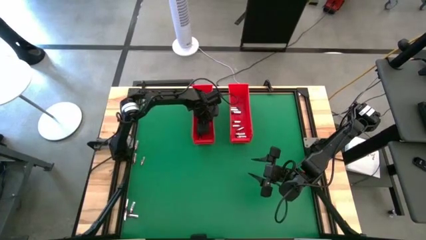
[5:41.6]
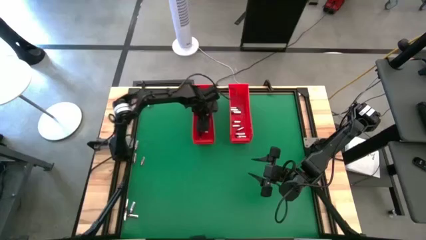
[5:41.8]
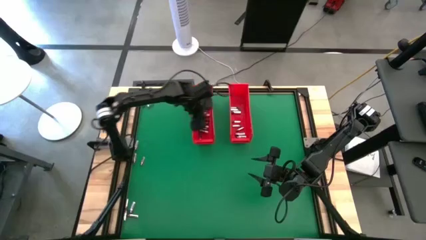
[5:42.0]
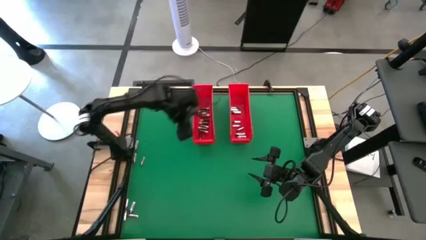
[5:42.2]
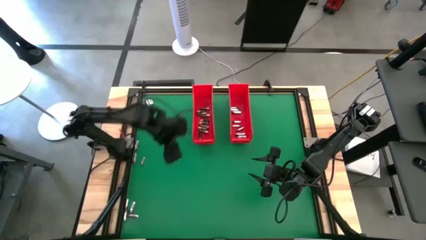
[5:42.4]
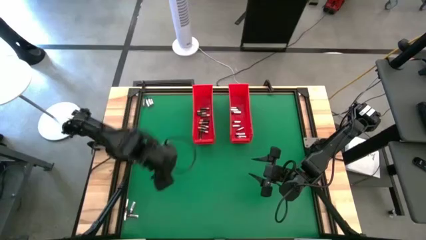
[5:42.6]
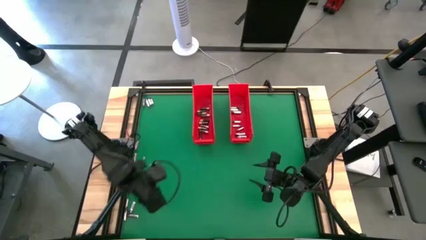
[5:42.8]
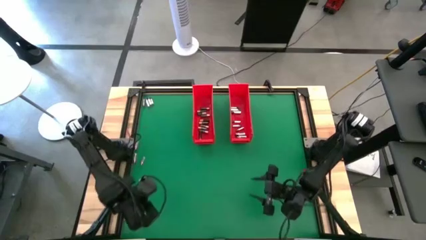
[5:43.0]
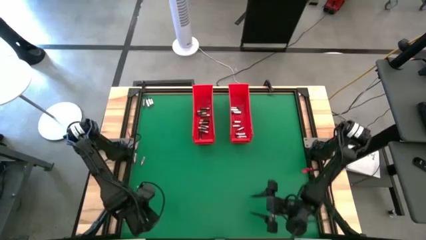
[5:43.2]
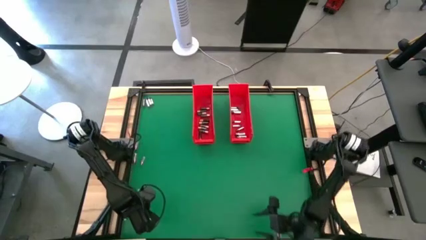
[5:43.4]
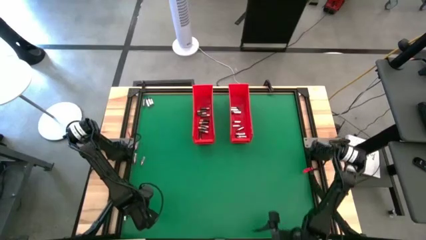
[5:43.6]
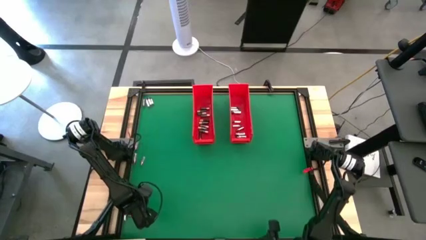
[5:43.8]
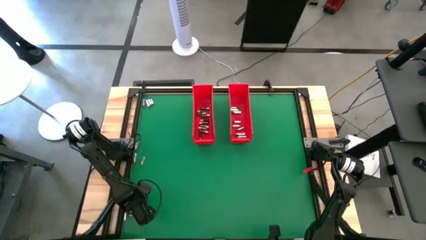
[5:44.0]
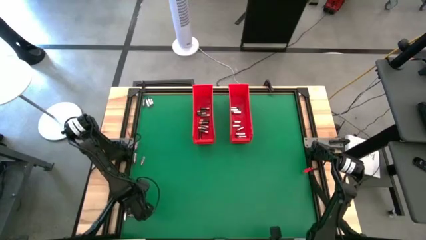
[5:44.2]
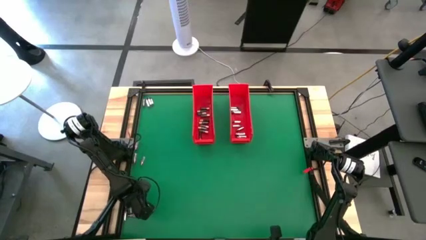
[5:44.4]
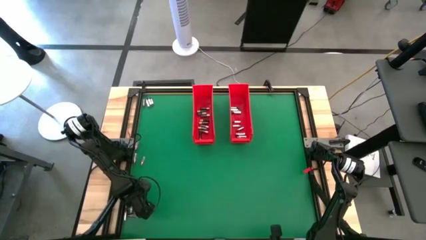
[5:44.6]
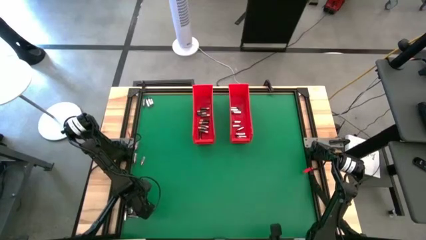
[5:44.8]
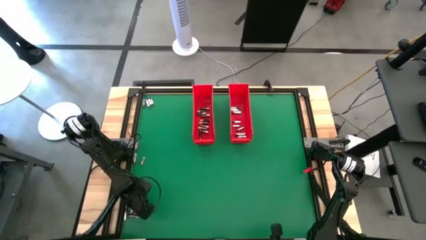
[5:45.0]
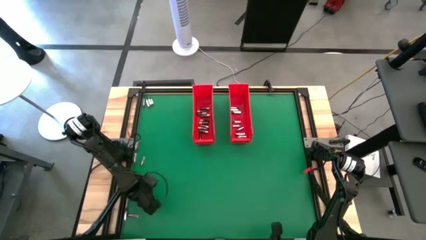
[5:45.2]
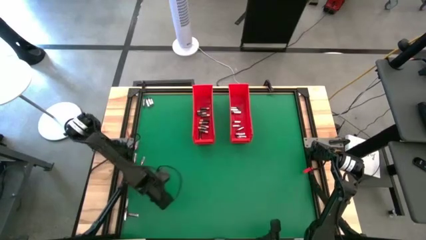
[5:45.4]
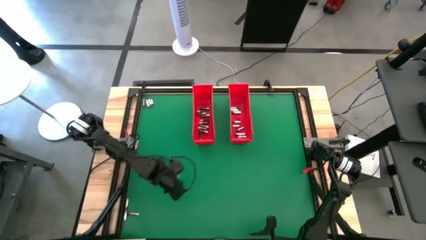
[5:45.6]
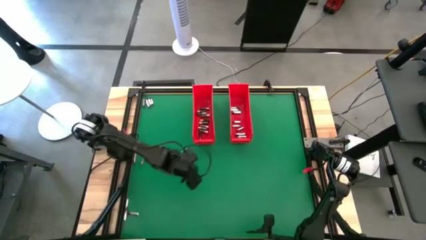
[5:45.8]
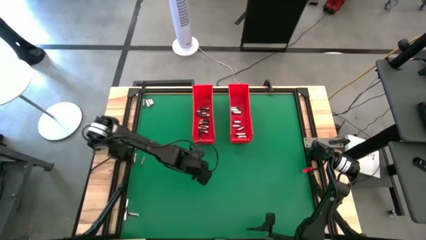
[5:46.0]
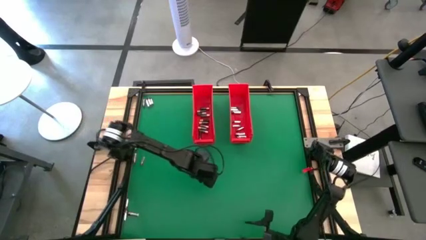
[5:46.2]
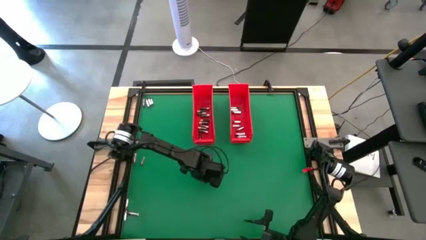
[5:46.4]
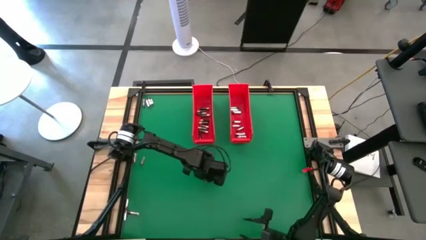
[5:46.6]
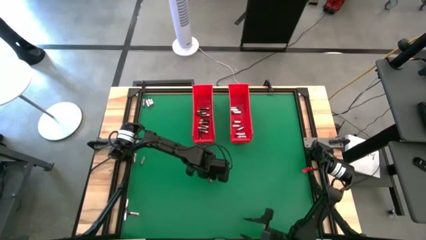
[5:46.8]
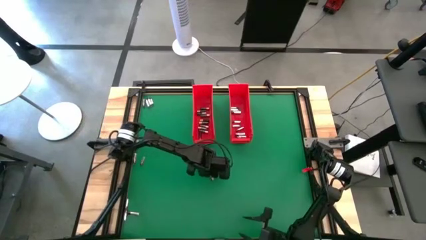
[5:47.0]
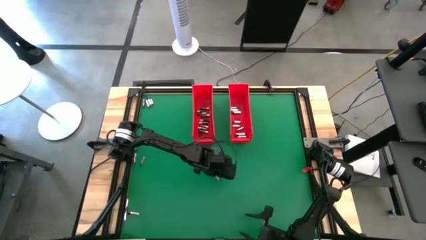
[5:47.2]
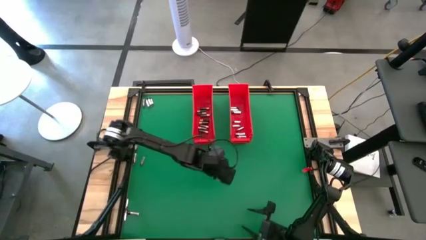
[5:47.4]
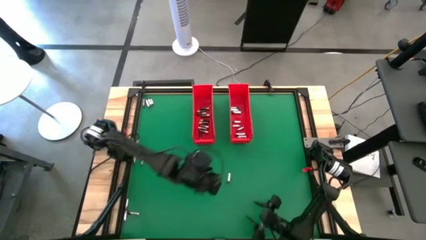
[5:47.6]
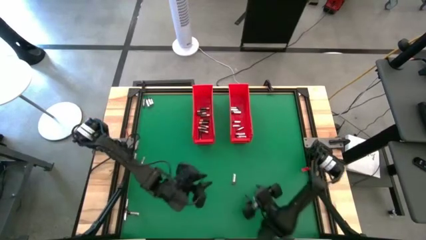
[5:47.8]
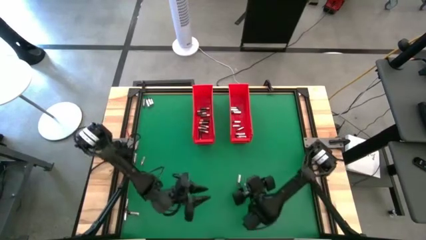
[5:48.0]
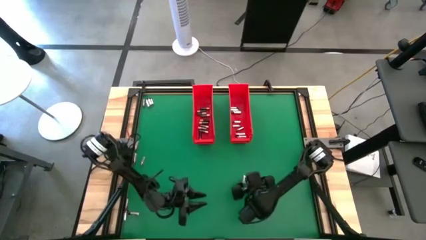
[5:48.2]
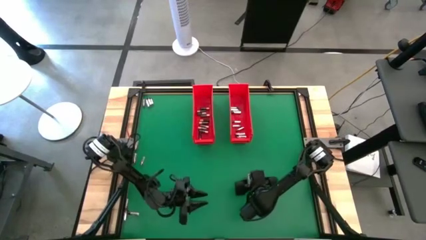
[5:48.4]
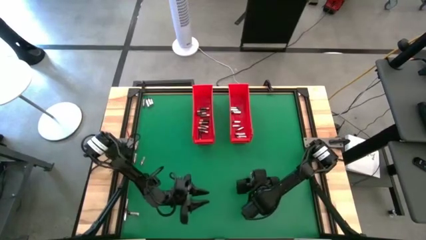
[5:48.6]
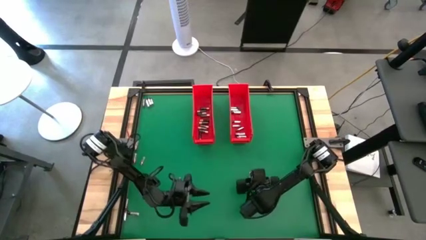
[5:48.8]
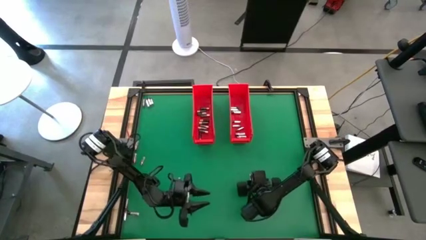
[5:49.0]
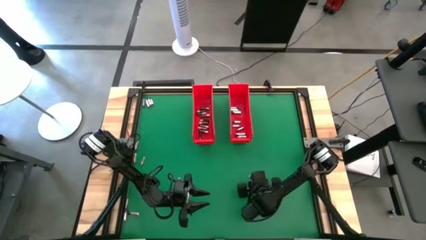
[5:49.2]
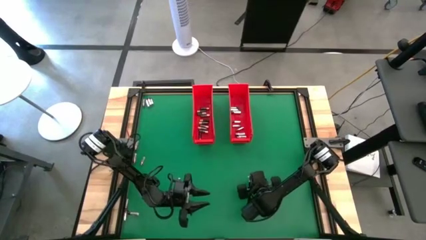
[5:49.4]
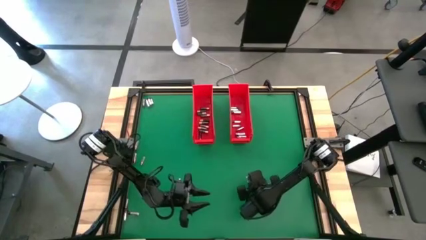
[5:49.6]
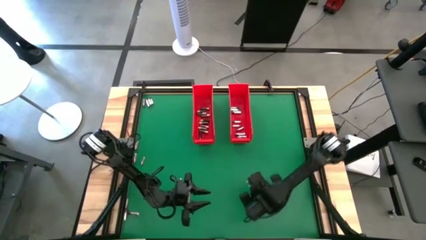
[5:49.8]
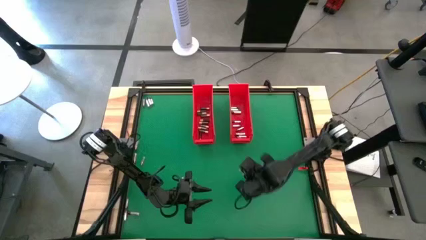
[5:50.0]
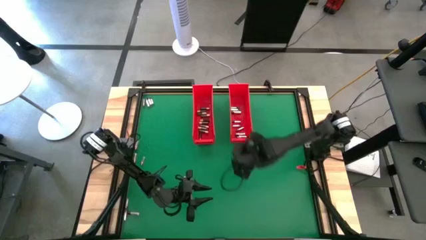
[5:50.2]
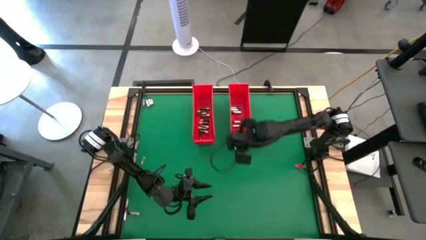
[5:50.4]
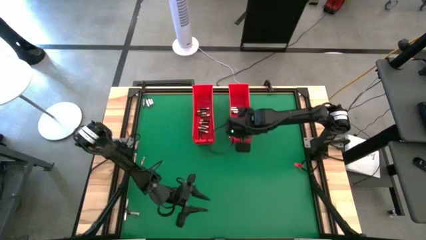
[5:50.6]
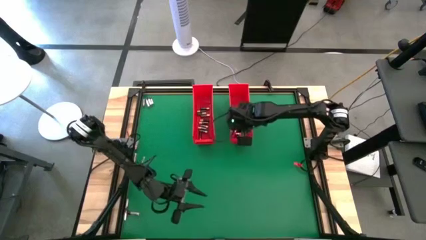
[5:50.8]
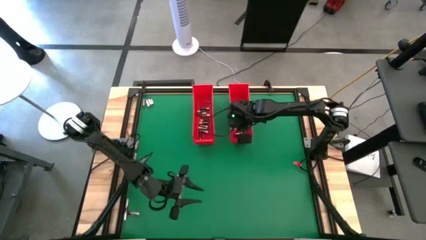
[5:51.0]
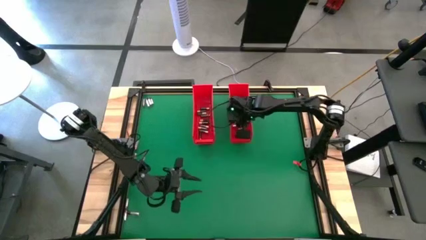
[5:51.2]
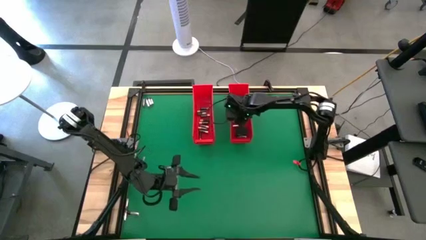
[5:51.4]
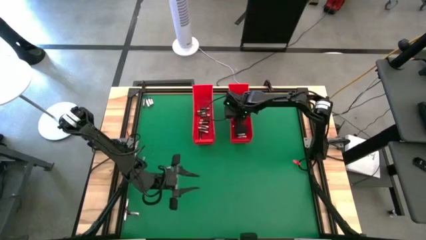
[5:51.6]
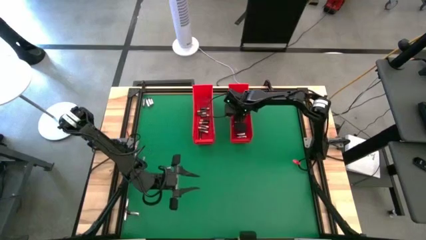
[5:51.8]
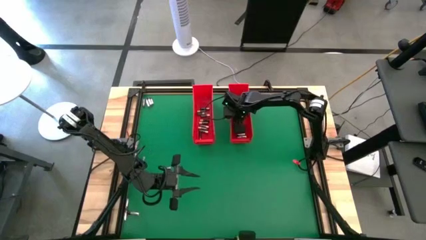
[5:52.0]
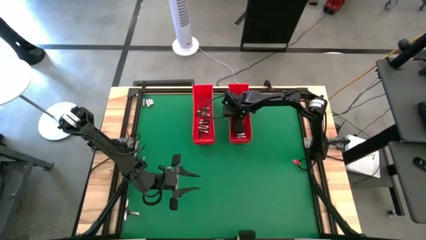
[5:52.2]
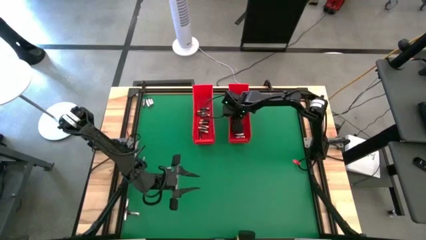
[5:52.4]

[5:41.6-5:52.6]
Task: Sort batteries
Put the silver battery into the right red bin

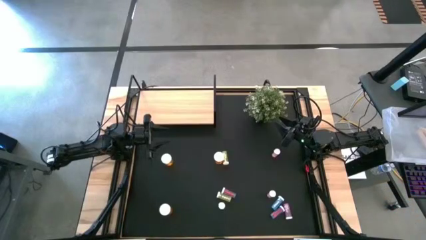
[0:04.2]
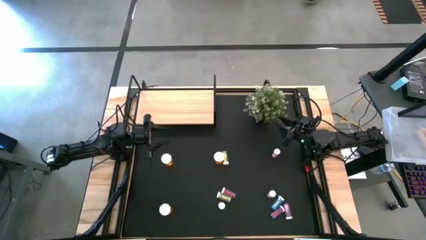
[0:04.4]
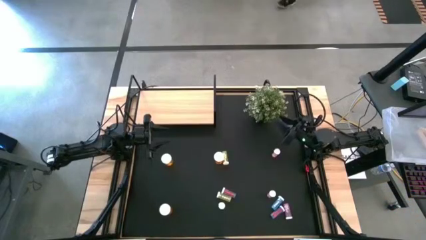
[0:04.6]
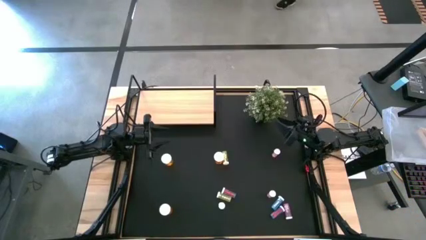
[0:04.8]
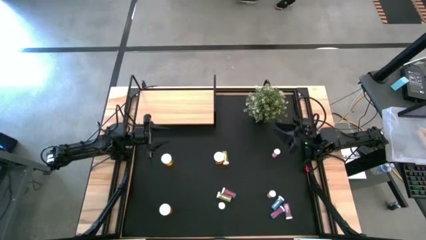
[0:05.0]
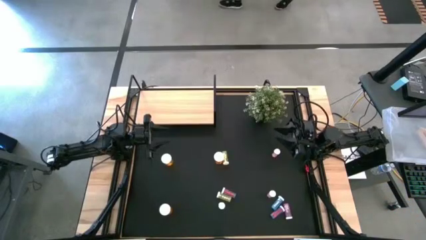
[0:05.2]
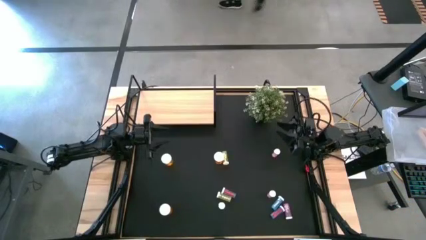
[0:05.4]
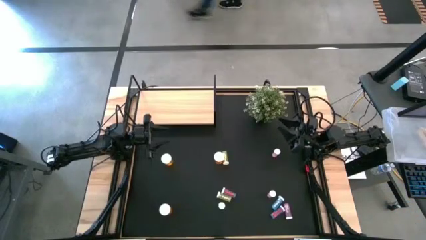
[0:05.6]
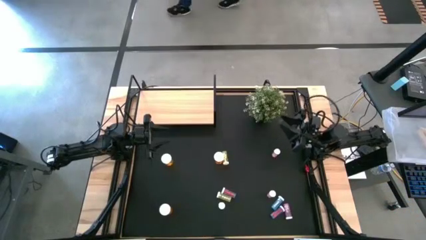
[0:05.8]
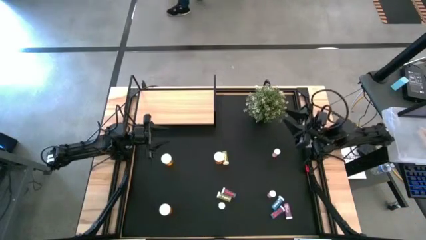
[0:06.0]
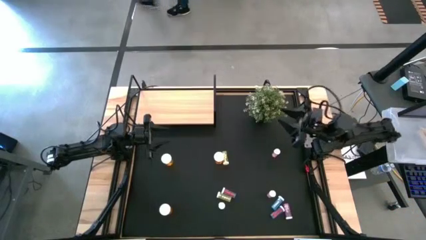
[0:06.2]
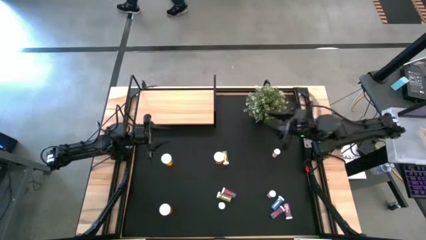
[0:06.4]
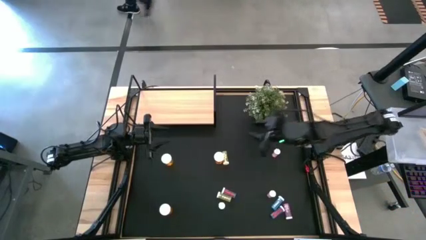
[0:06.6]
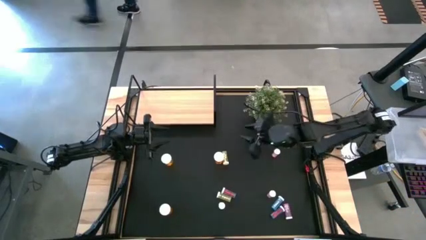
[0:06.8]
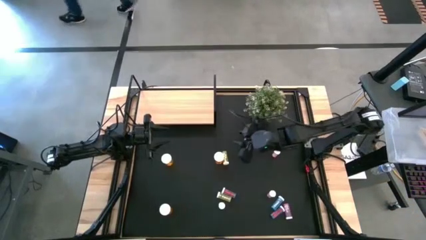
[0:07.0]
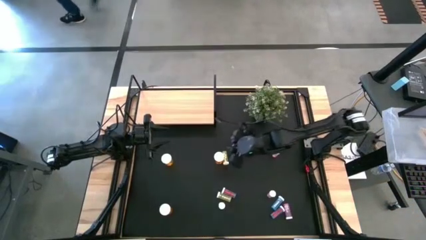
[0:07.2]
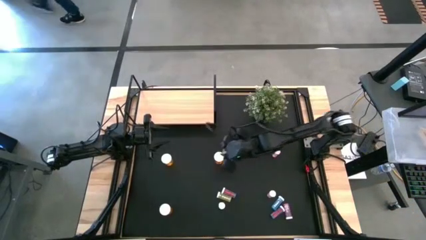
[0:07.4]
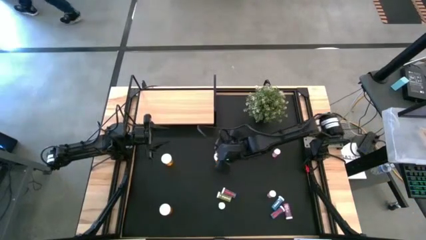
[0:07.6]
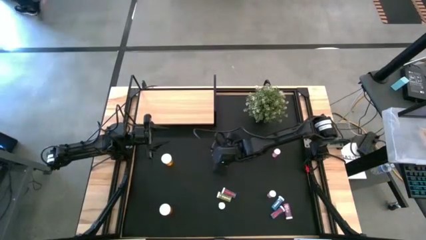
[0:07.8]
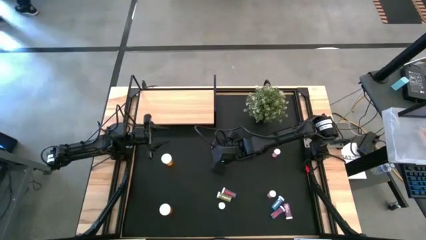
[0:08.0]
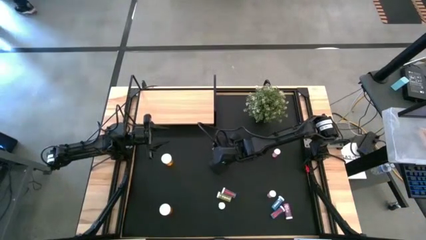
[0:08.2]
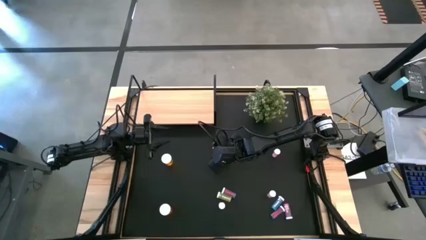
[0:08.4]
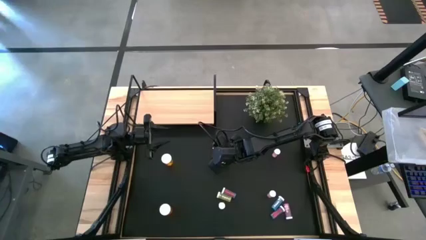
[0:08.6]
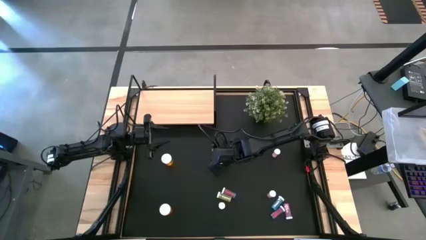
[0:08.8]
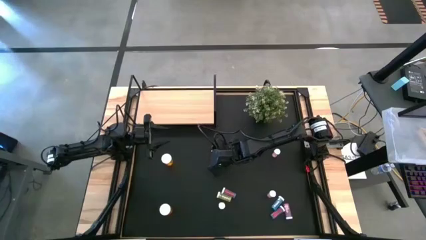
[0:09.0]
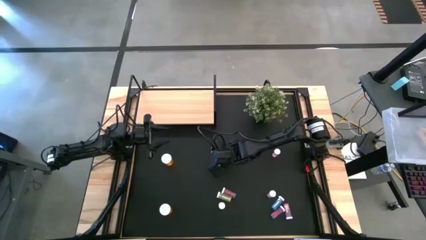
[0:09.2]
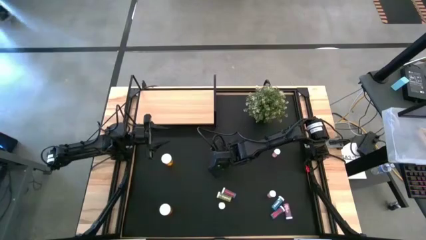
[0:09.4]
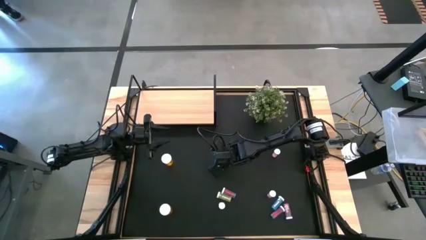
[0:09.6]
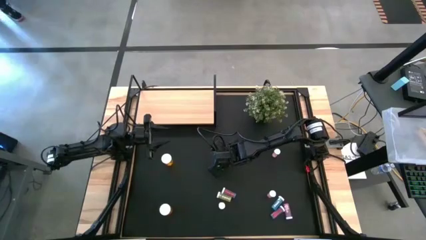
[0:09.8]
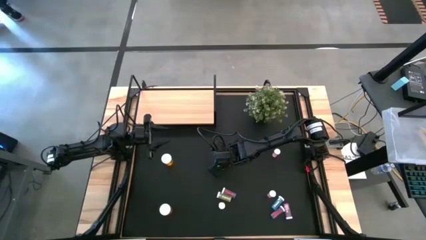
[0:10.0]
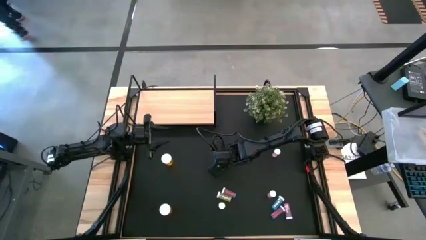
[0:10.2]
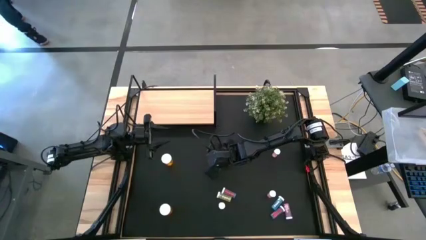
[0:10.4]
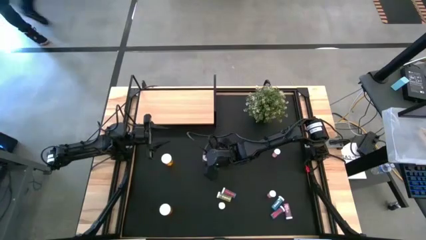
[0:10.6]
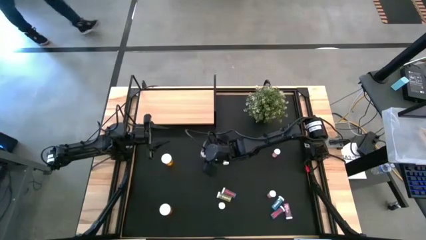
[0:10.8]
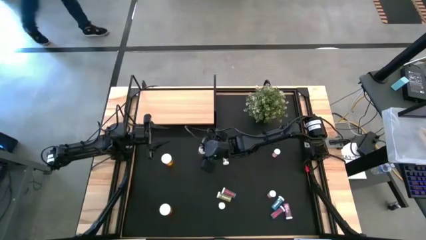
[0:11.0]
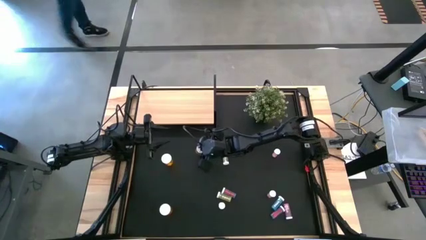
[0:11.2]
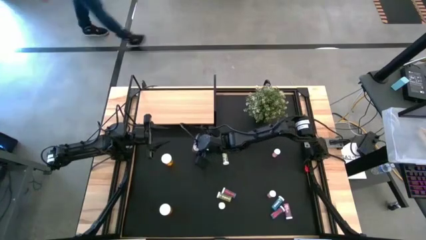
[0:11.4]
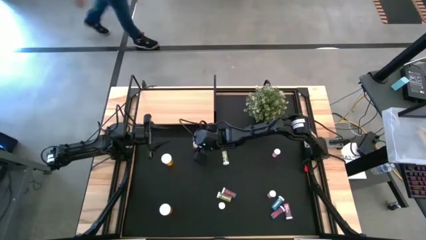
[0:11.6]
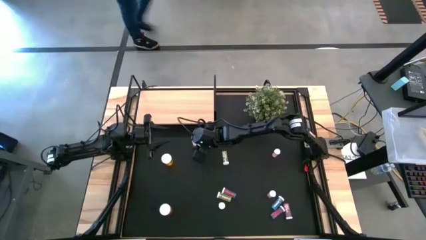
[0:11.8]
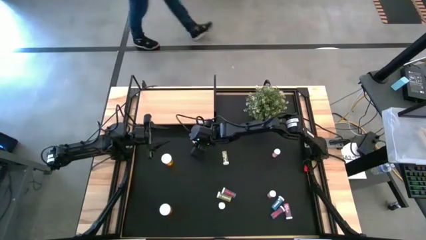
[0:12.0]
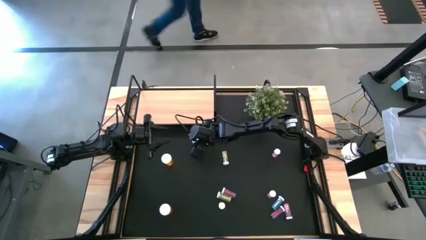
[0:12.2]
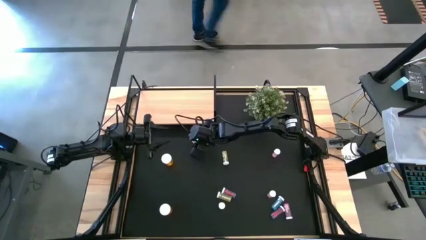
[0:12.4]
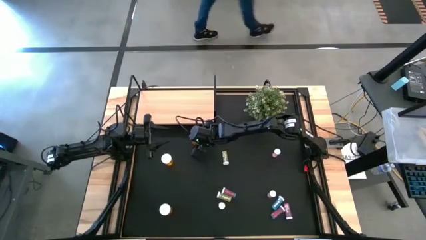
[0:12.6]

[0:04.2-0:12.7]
Task: Pick and place medicine bottles onto shelf by color
Move the orange medicine bottle to the left
